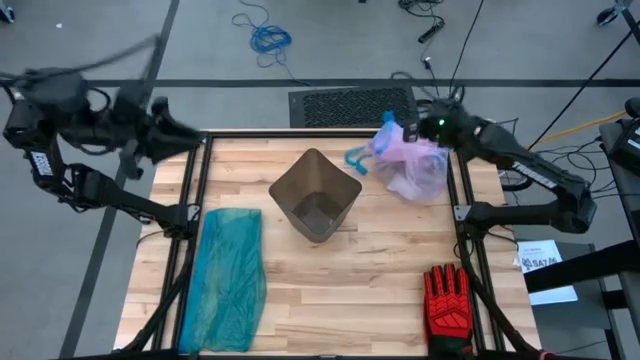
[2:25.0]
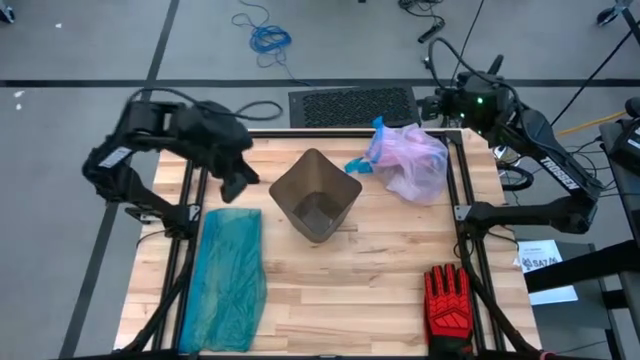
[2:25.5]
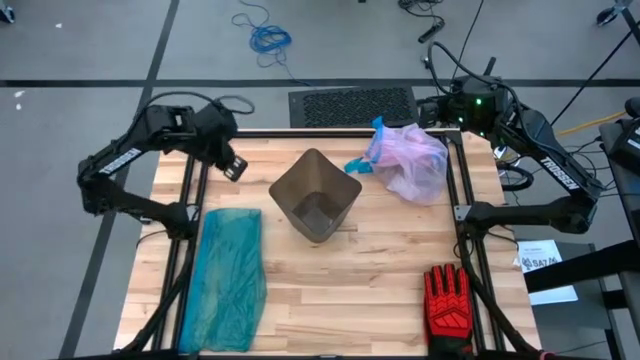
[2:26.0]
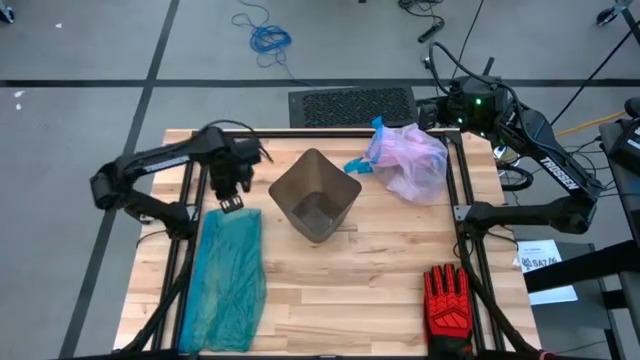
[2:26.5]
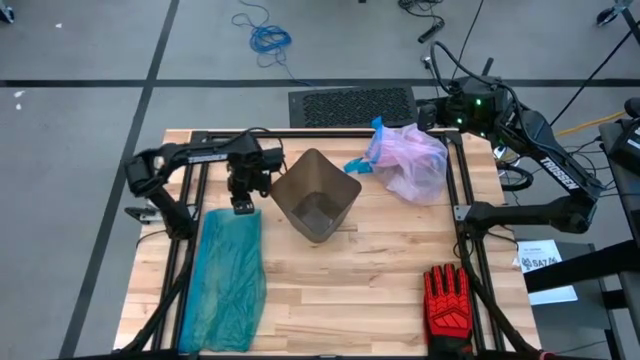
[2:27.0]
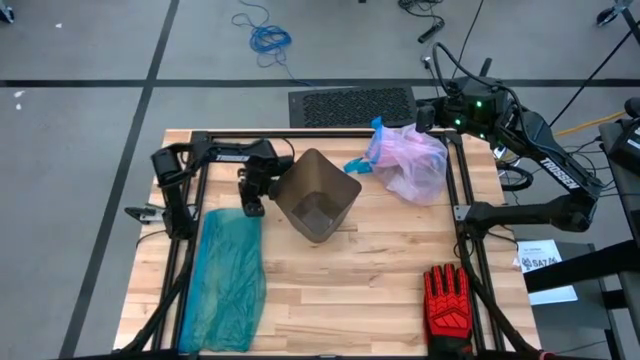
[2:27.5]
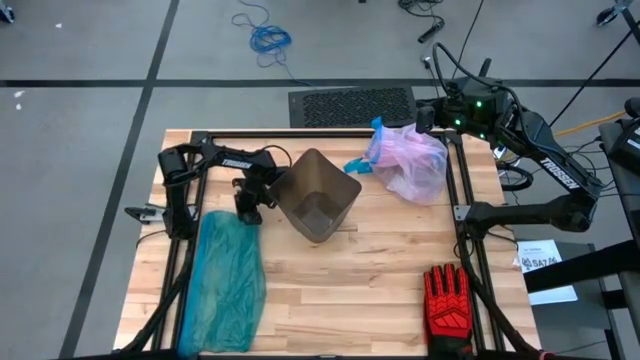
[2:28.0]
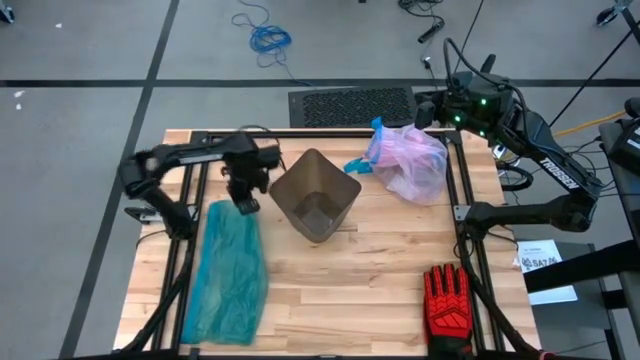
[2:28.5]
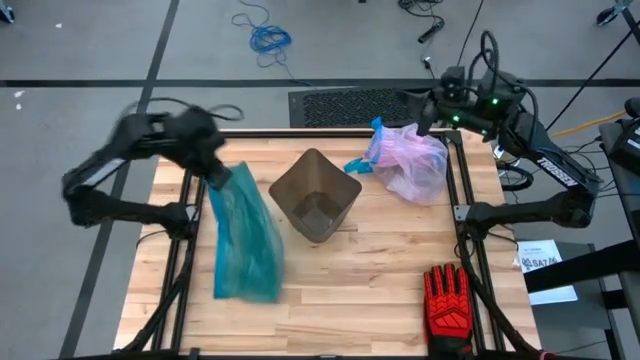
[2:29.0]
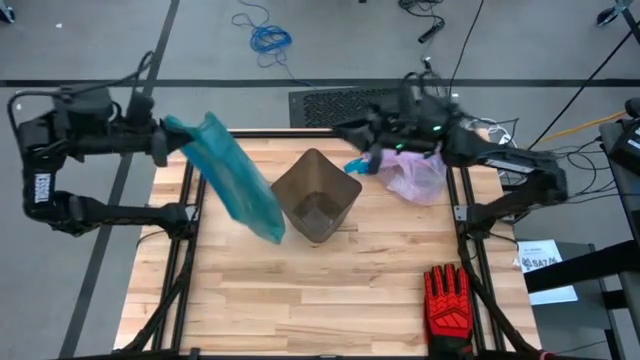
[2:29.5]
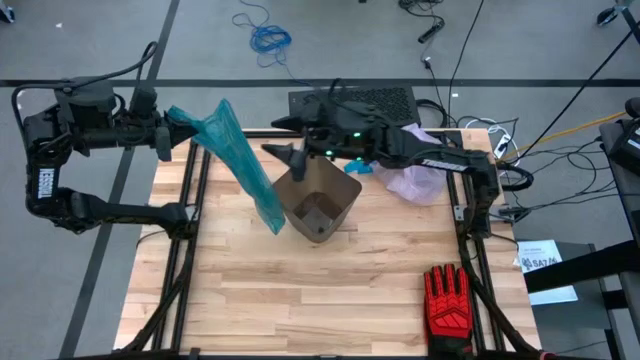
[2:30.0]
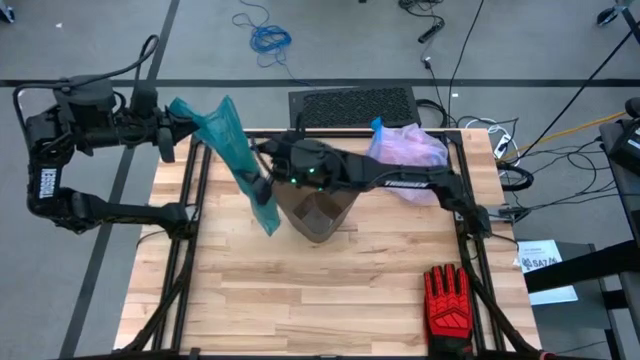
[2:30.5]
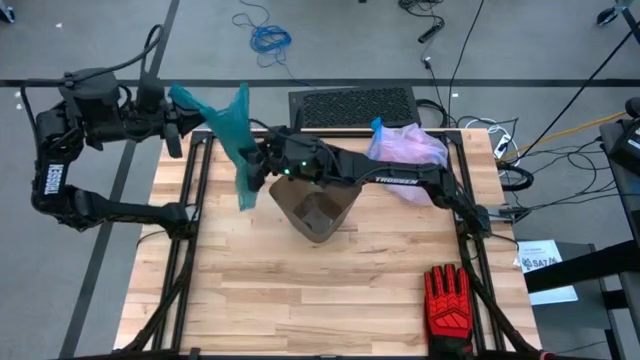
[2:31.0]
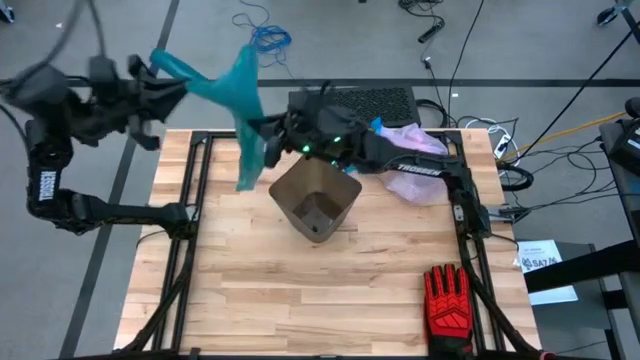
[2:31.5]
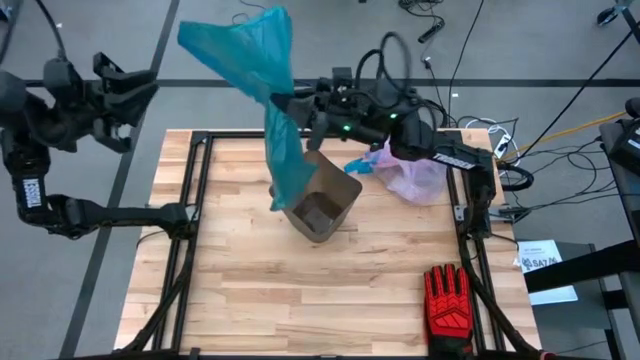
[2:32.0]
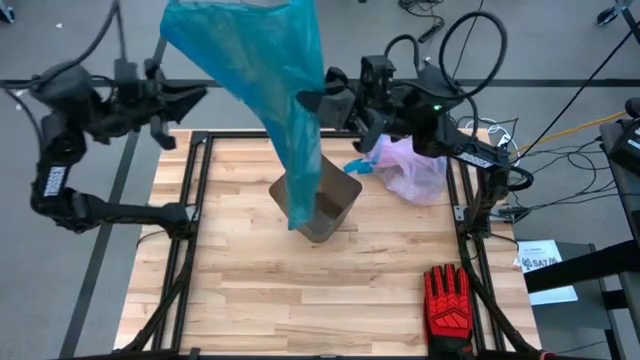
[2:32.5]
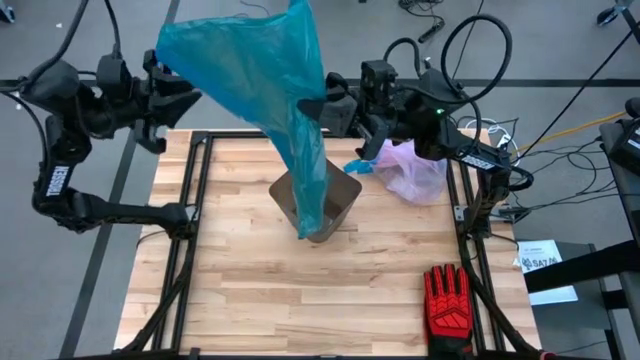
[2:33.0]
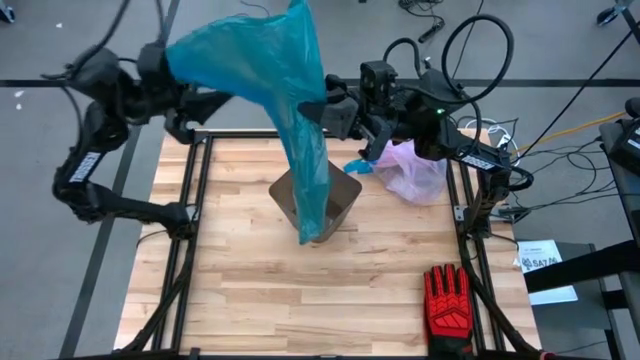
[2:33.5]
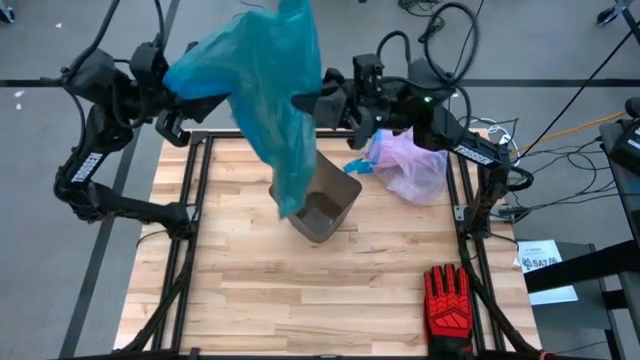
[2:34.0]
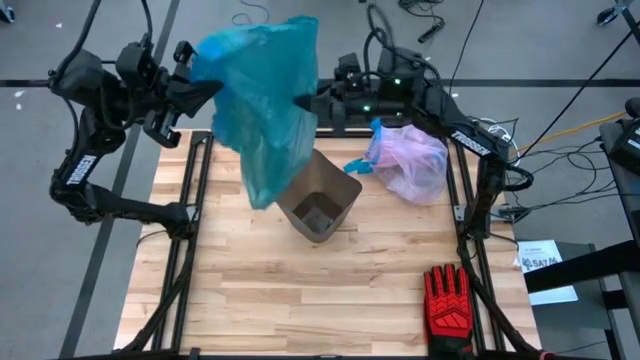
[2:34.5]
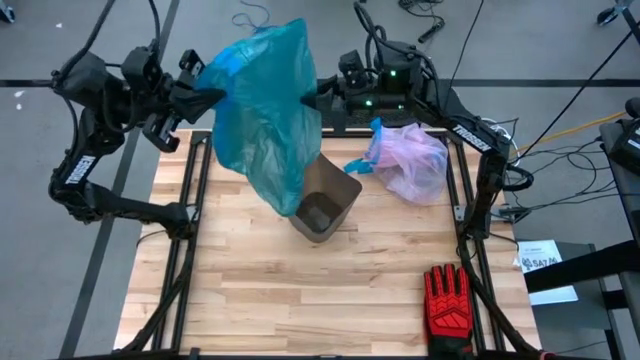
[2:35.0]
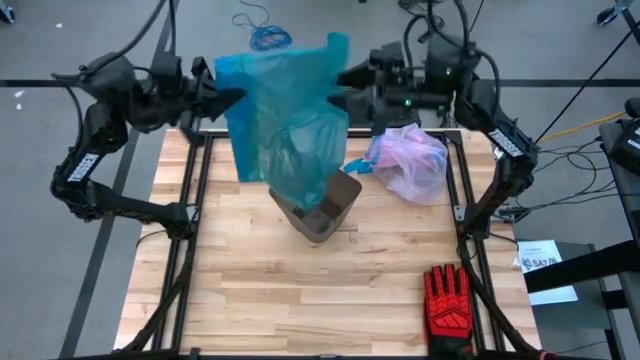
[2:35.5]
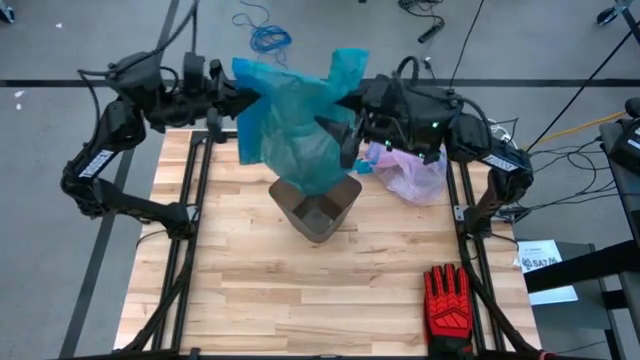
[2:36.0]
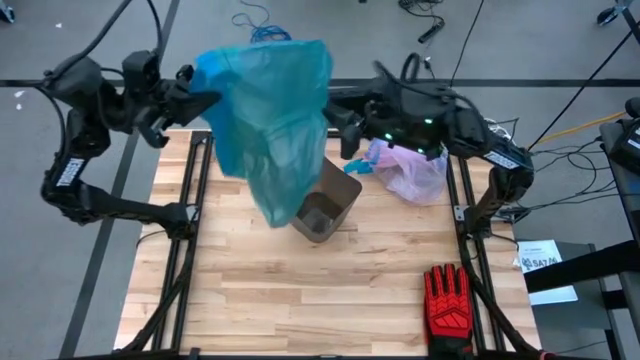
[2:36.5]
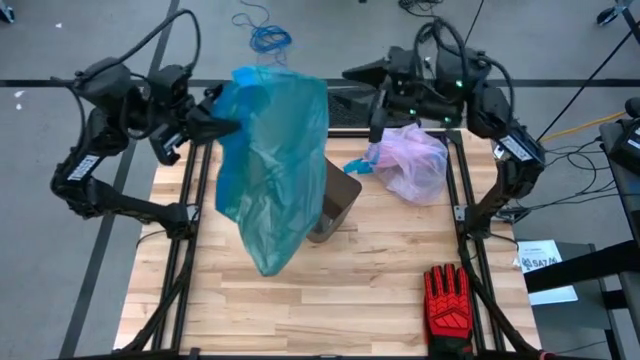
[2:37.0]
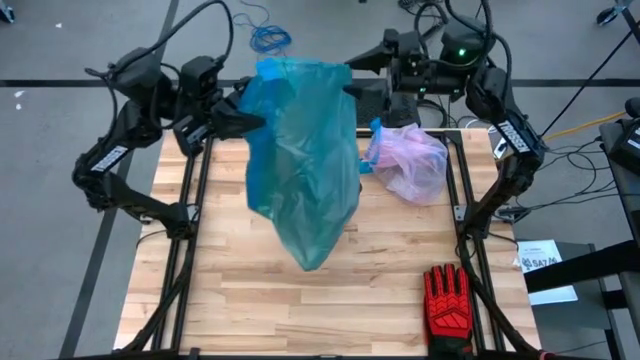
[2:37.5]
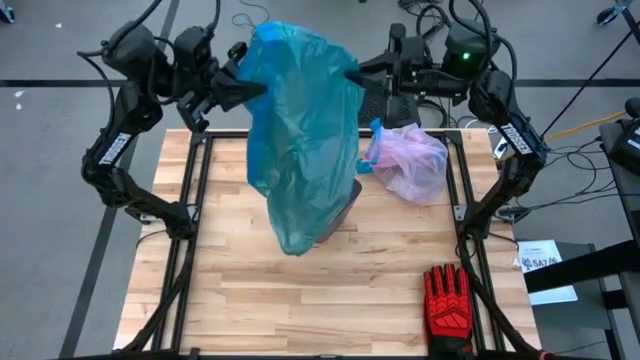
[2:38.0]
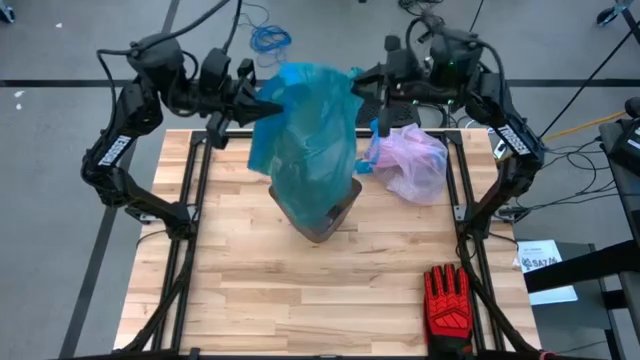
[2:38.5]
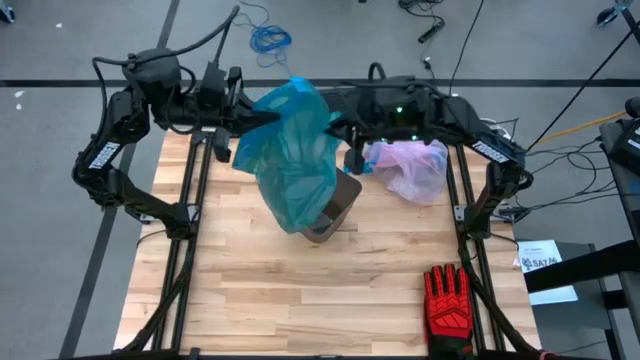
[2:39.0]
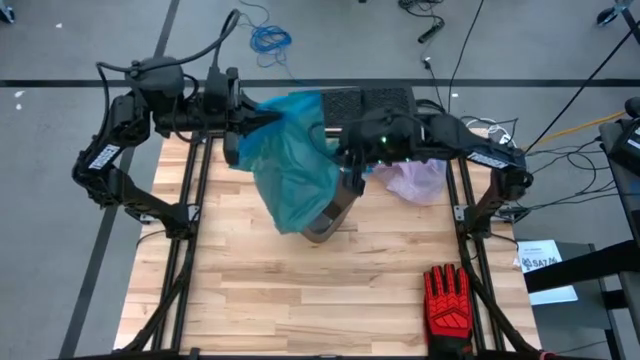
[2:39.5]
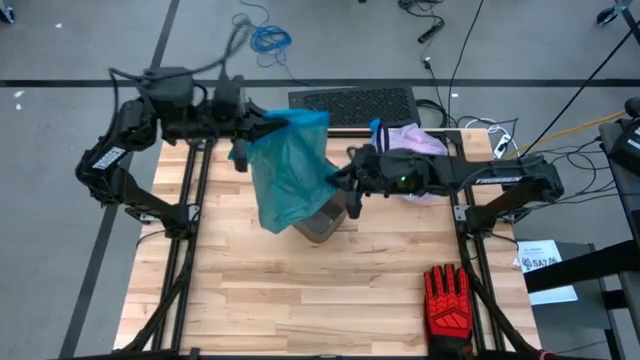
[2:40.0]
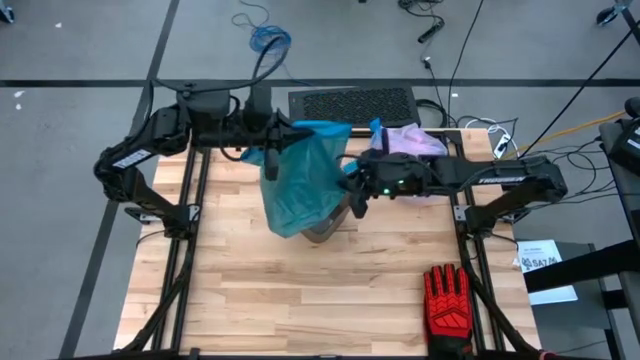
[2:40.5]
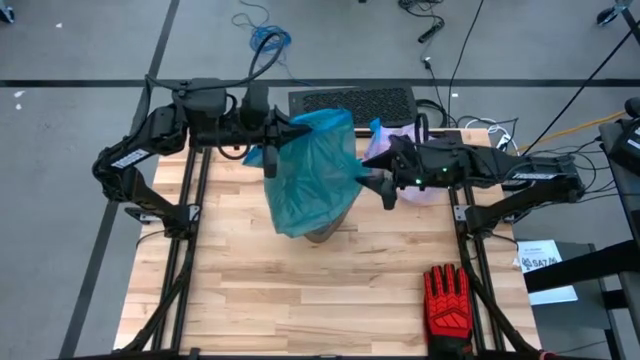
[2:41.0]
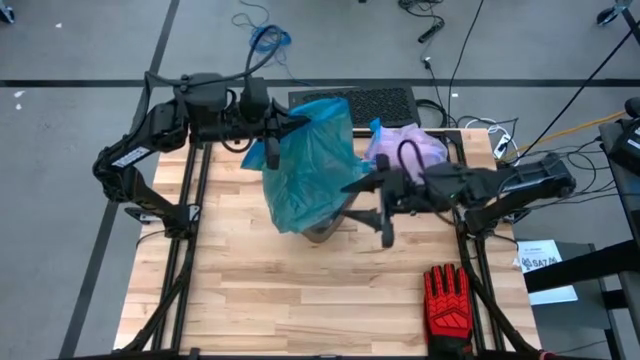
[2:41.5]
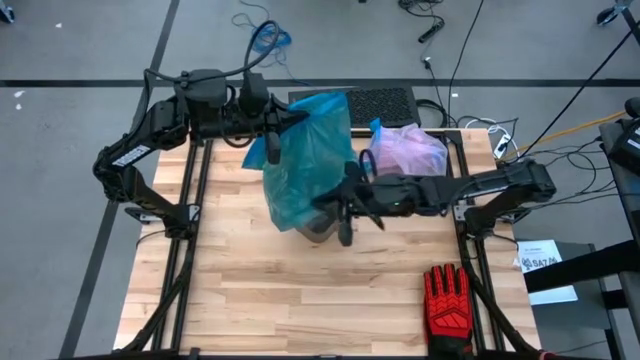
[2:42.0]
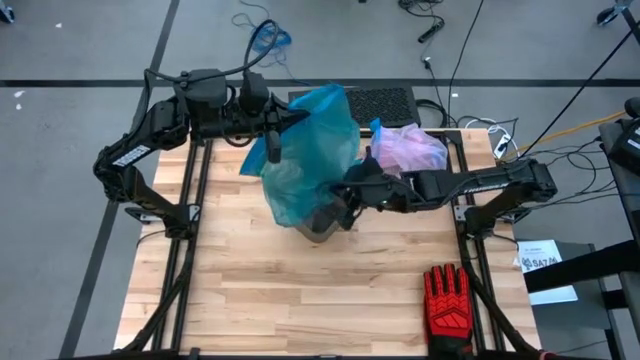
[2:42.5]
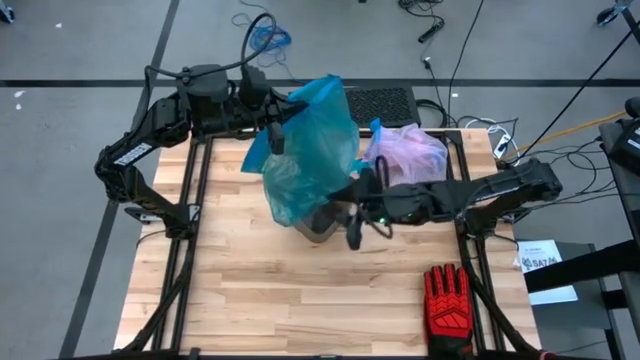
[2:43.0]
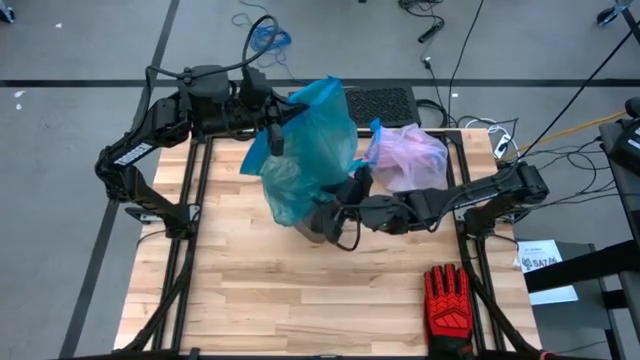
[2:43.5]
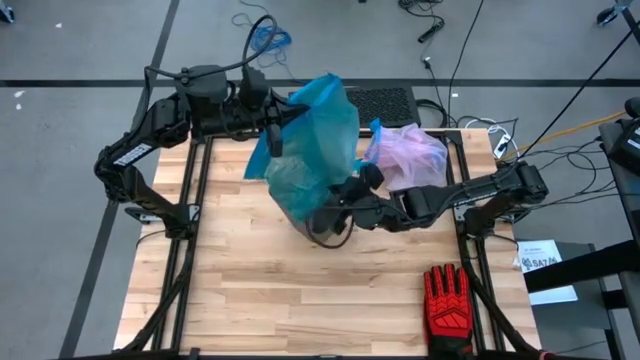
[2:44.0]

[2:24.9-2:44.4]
Task: place trash/remove bag and relplace
Insert a new trash bag into the bin

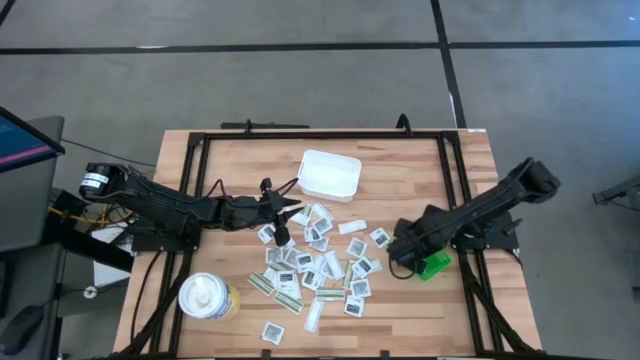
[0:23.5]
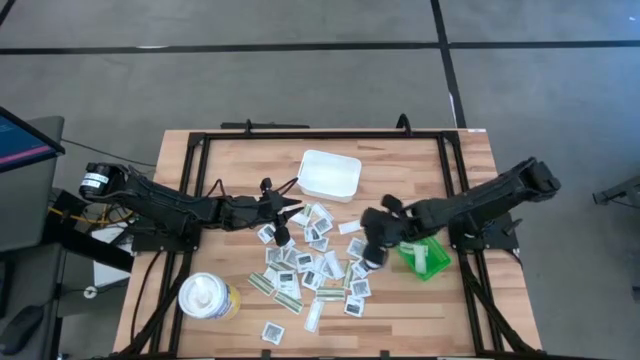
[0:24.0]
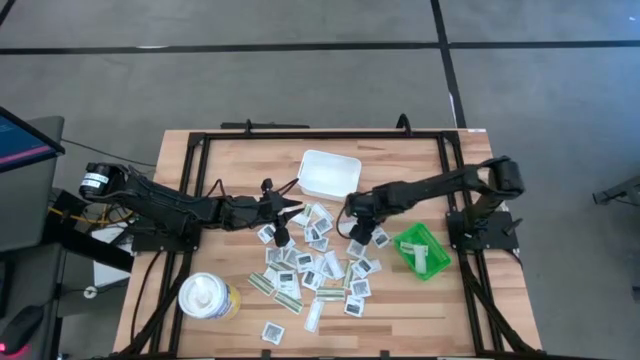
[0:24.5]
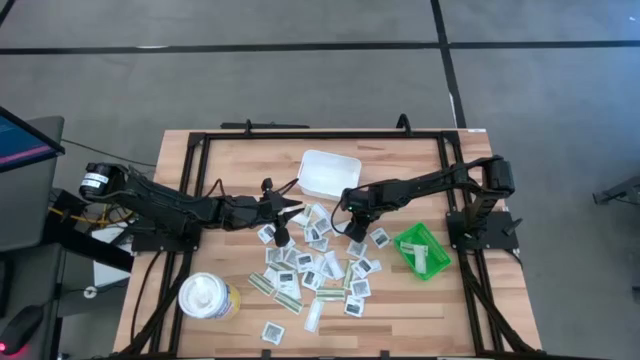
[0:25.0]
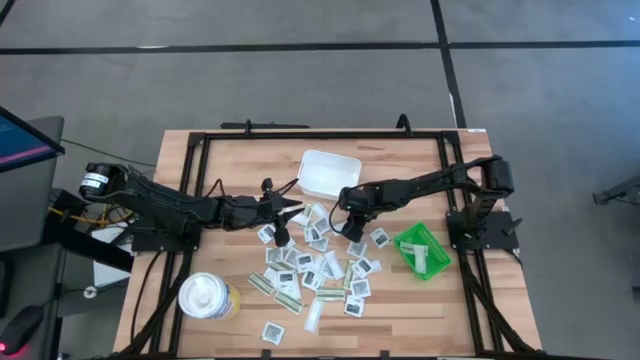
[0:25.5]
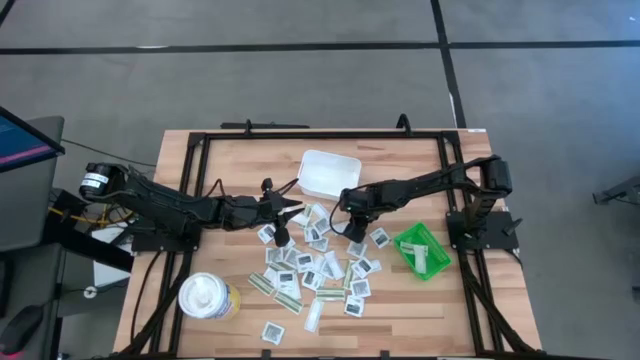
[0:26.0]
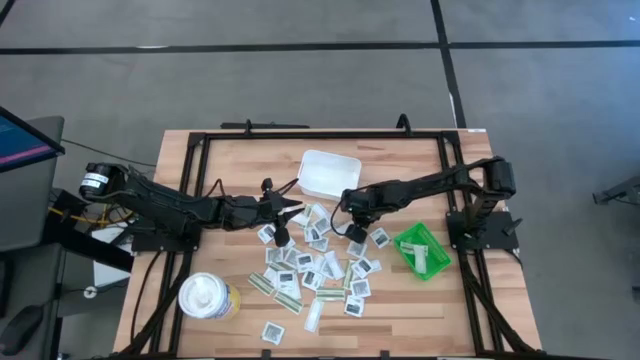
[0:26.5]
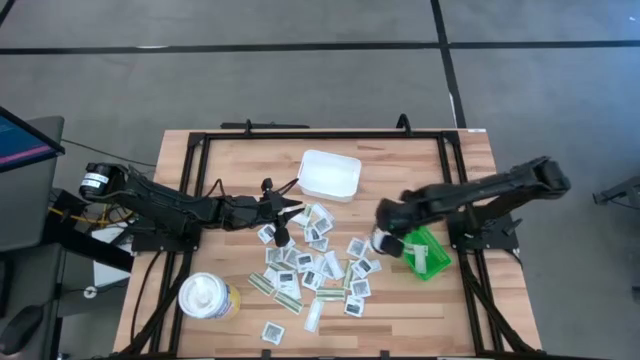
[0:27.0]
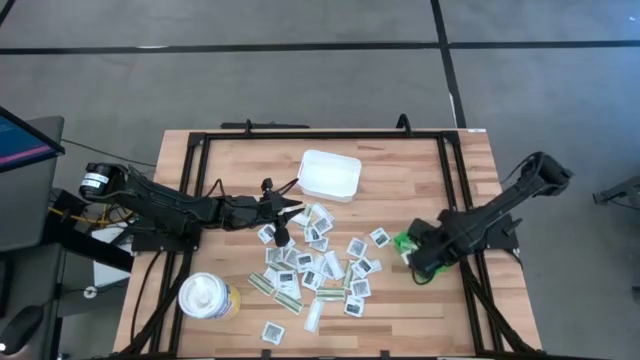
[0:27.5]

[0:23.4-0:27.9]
Task: Pick & Place First Aid Supplies
Put the bandage pack into the green bin
